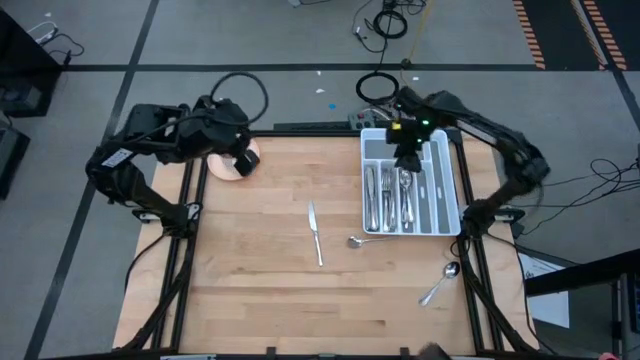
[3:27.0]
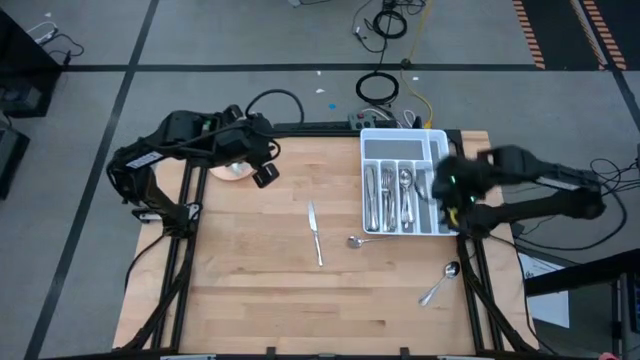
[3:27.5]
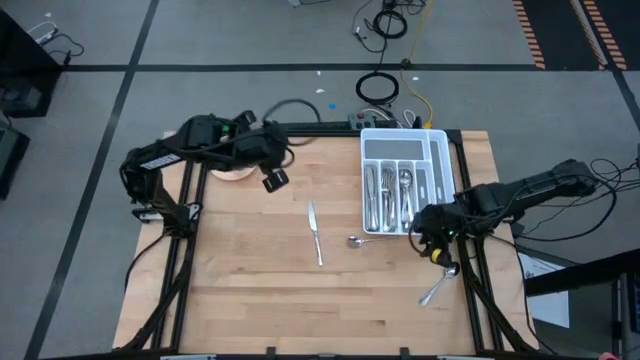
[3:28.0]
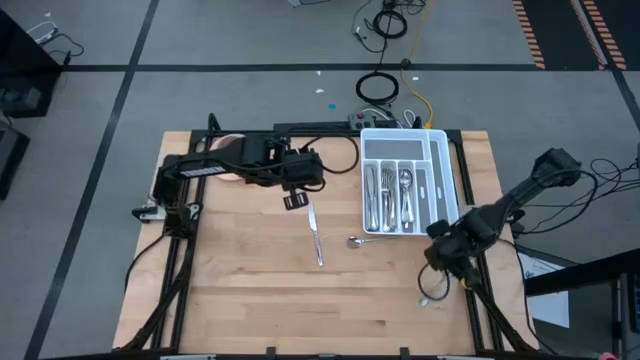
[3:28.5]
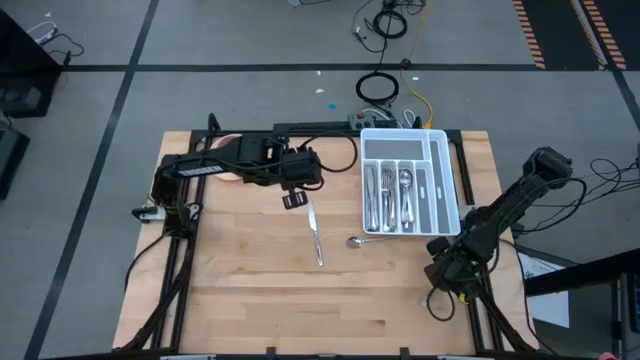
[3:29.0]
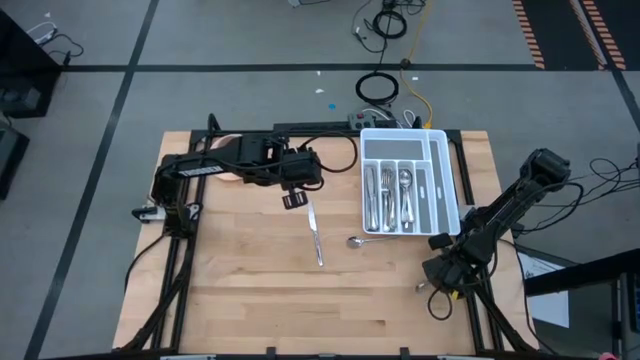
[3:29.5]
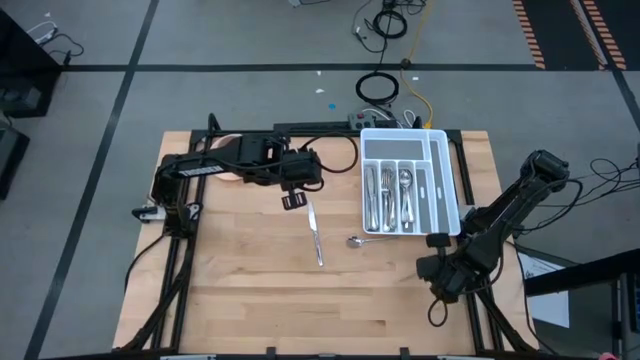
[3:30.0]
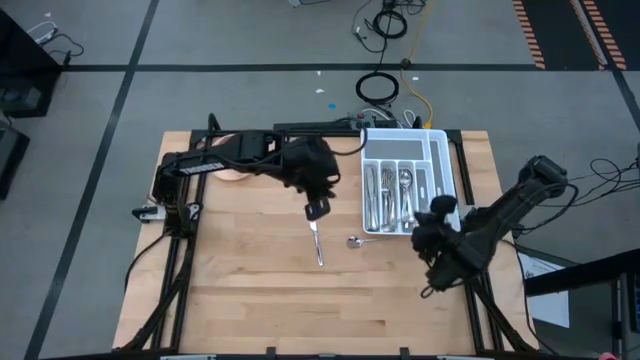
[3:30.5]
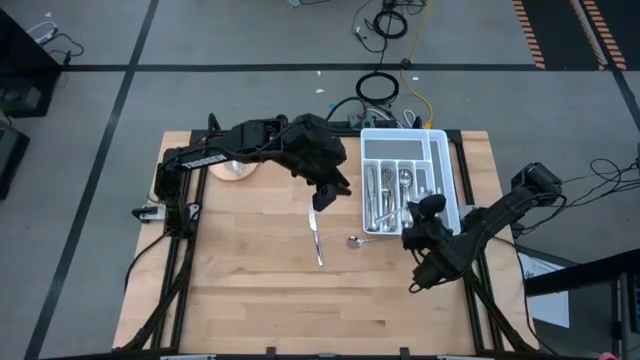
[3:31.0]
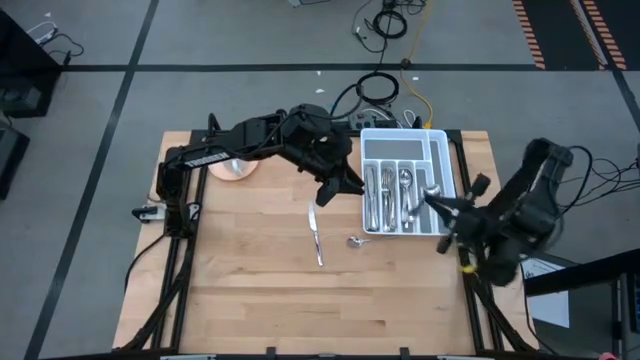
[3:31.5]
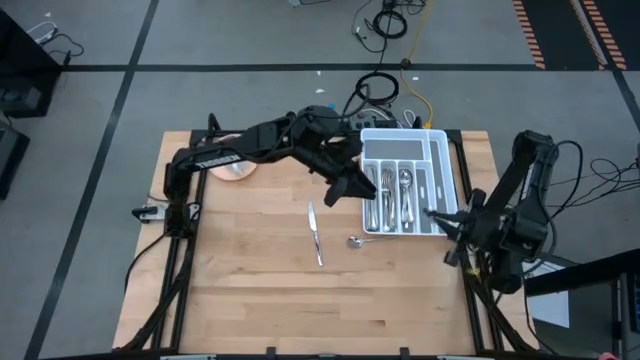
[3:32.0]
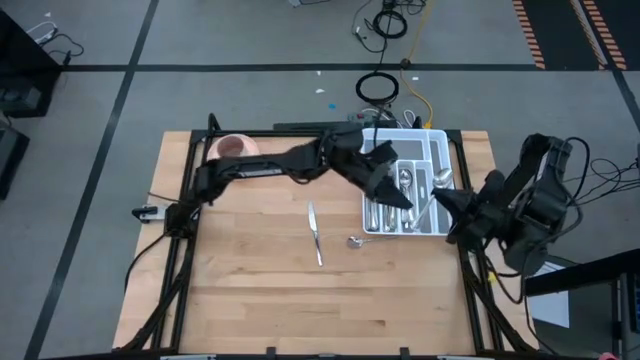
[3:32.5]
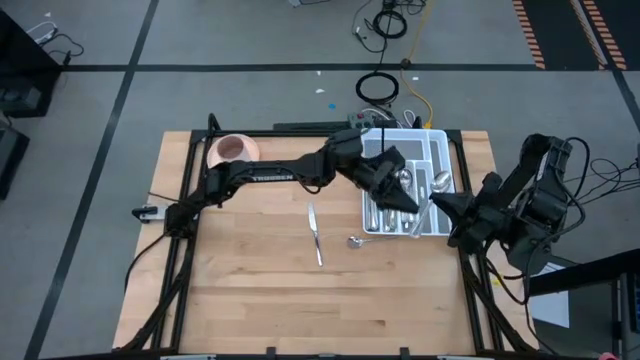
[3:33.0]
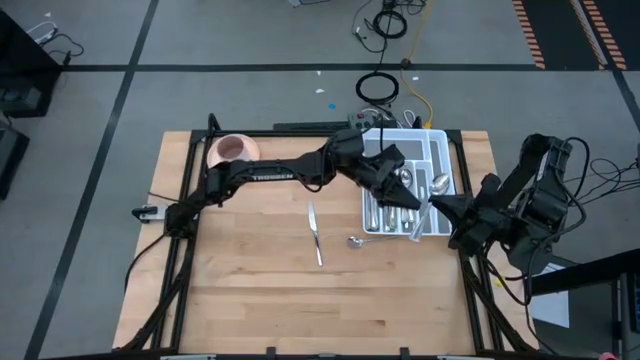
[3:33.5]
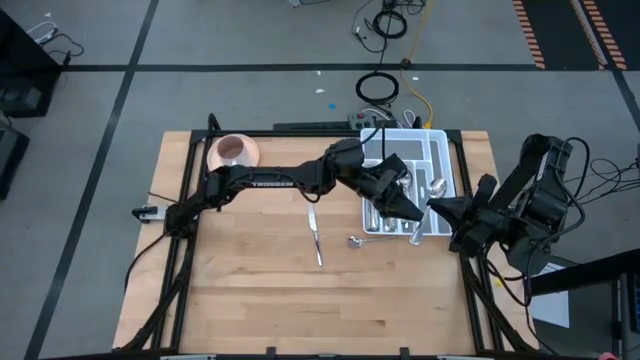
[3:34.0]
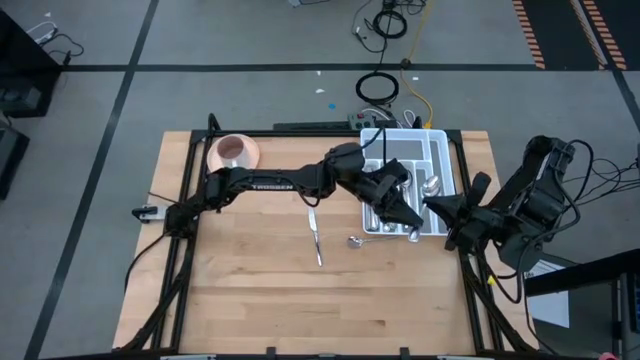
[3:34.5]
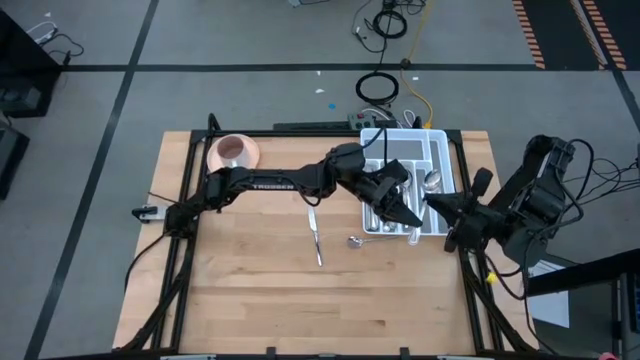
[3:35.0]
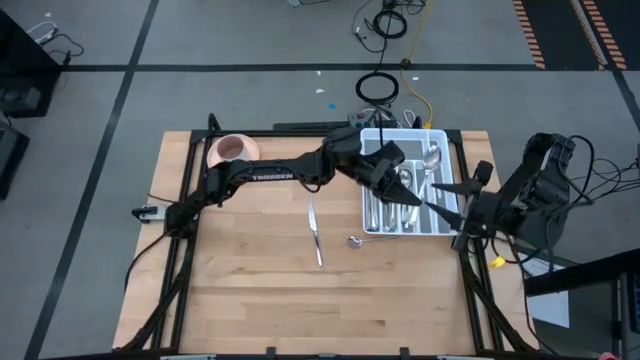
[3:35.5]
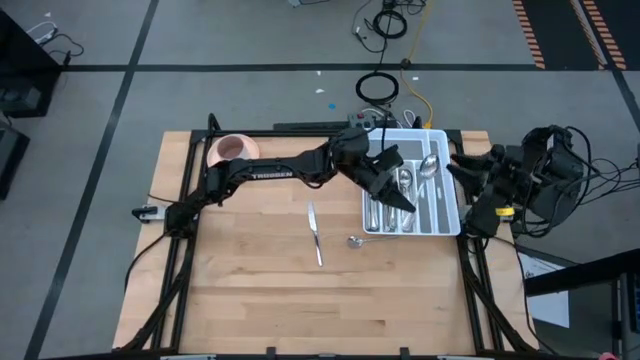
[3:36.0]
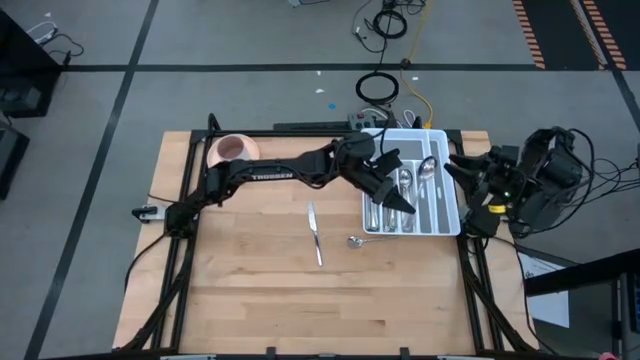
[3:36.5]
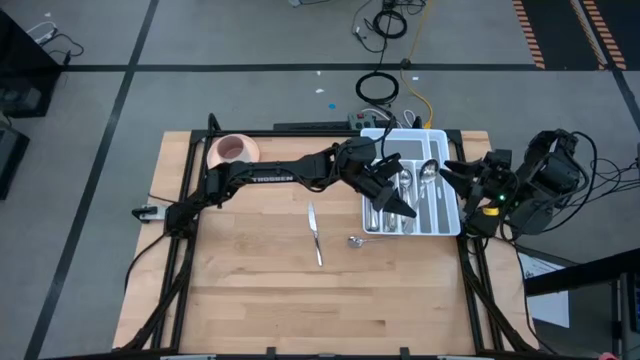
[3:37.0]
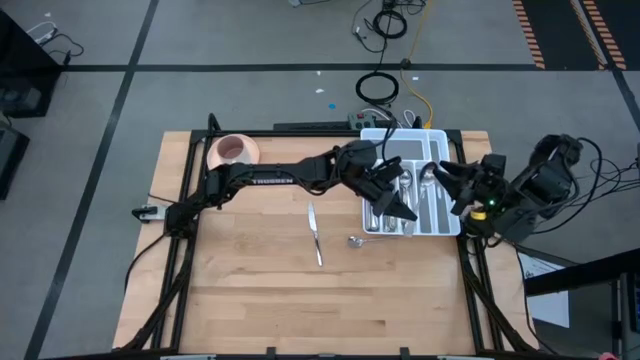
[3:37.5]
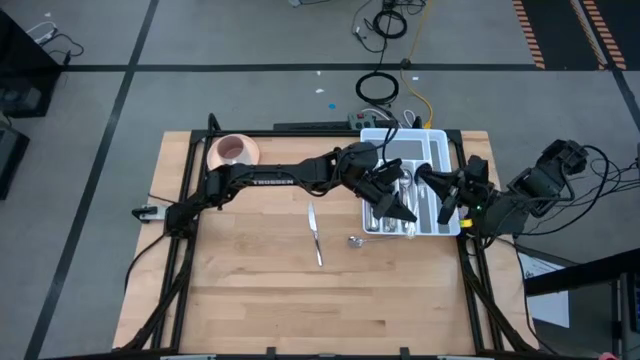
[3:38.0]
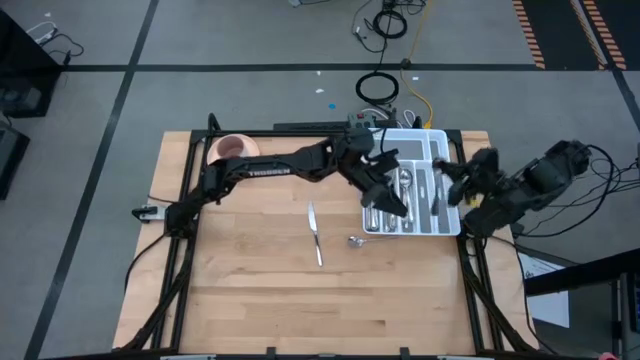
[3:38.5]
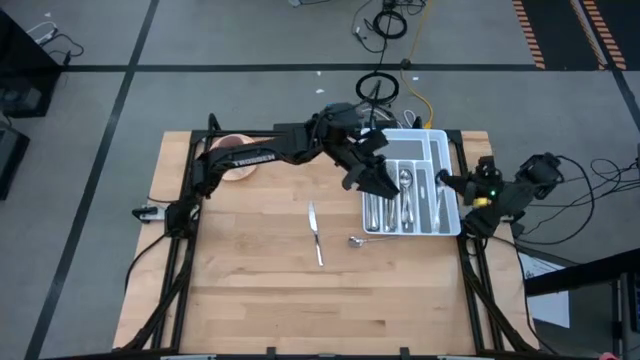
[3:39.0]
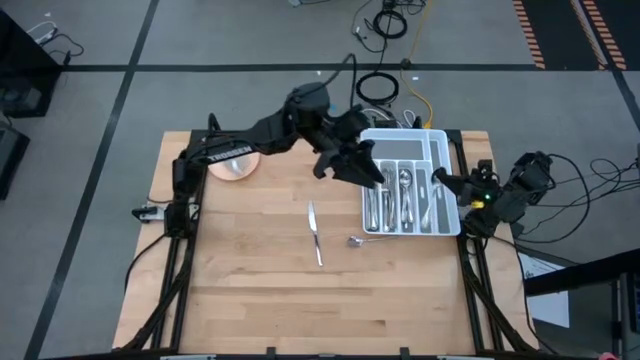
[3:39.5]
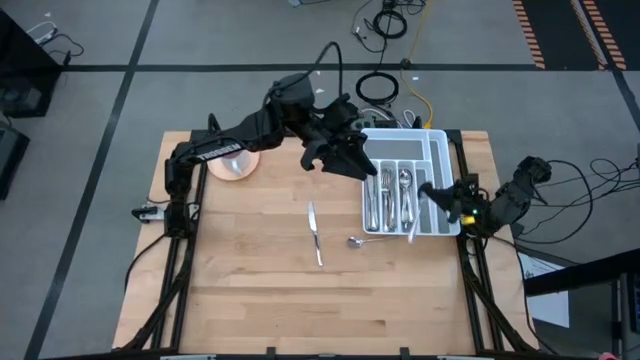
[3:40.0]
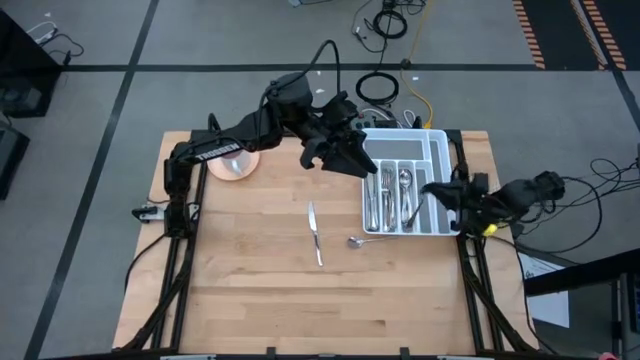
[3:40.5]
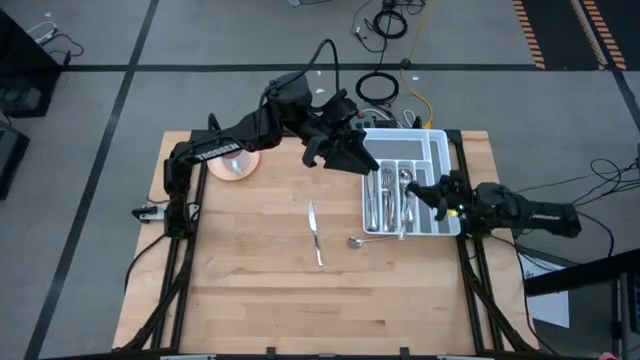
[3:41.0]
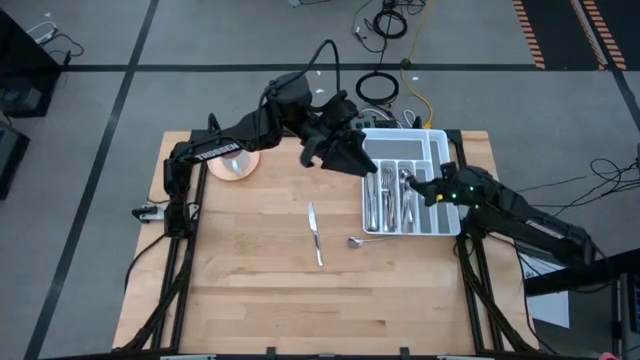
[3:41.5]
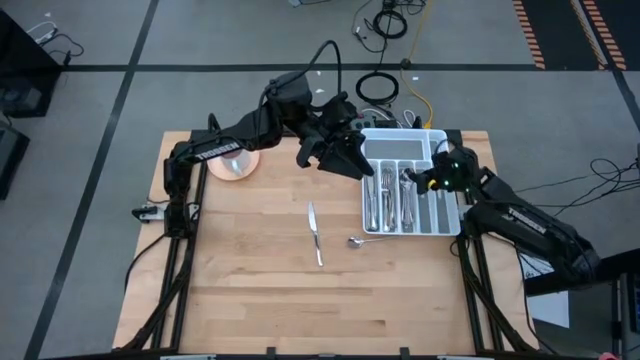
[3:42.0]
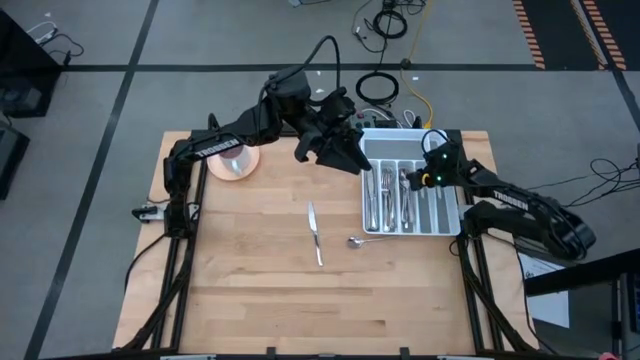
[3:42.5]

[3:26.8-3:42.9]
Task: Sort silverware
Put the silver spoon into the white cutlery tray

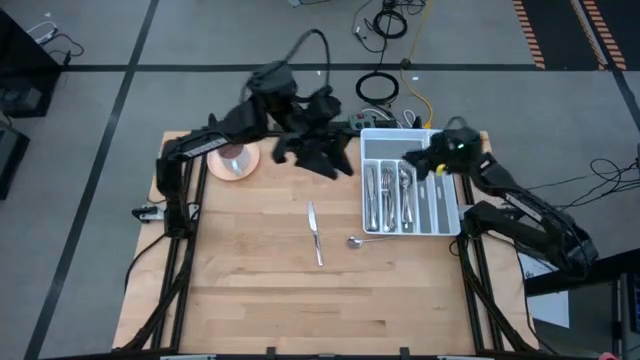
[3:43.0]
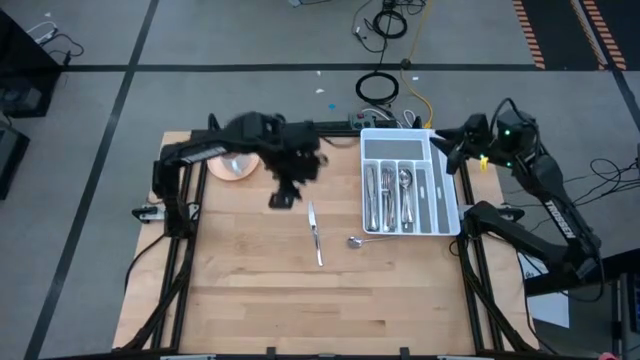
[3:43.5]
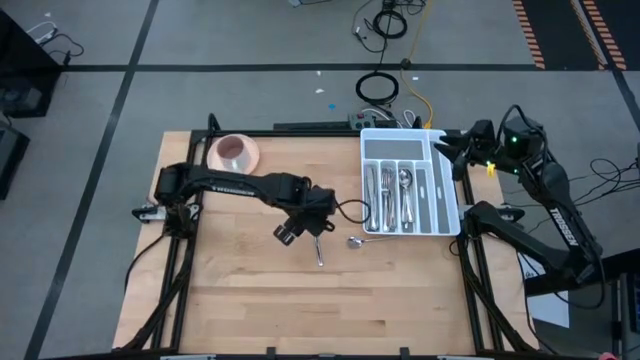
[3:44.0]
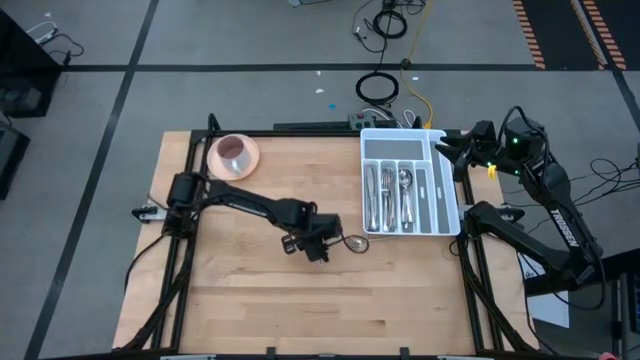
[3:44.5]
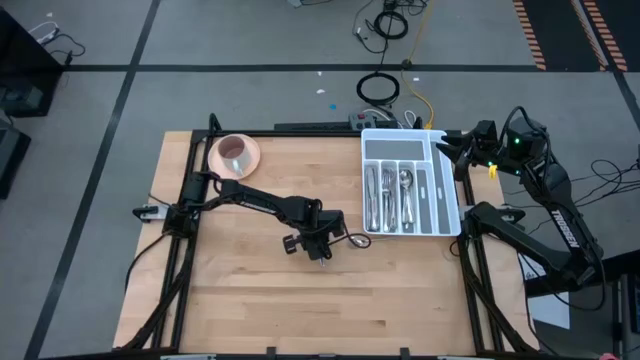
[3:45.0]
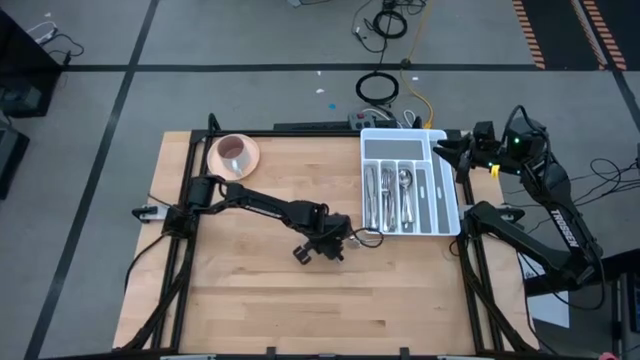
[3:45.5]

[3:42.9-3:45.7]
Put the silver knife into the white cutlery tray

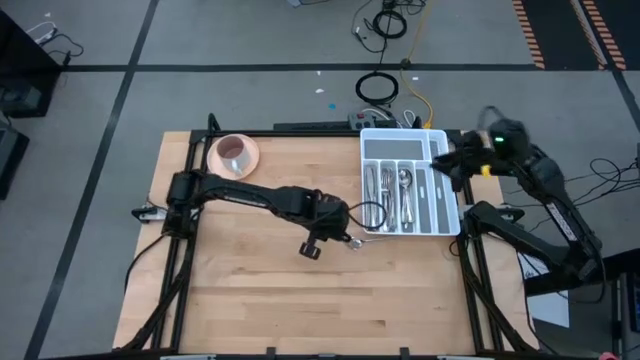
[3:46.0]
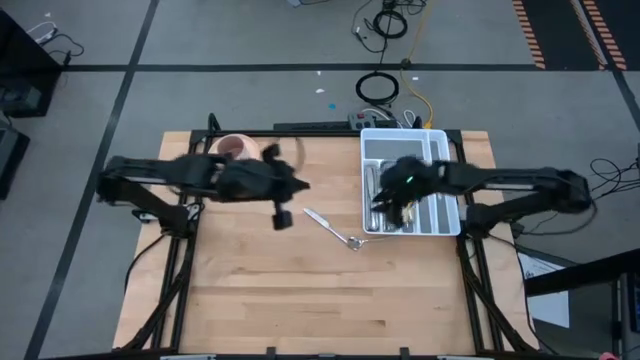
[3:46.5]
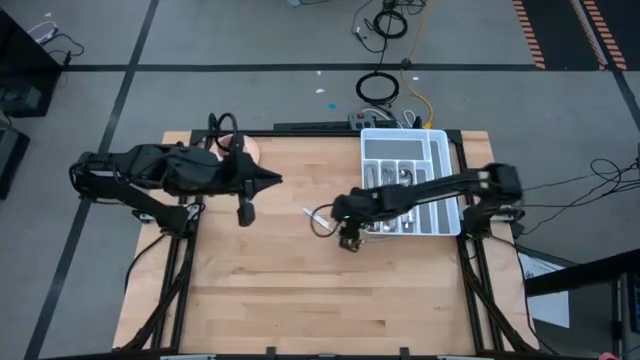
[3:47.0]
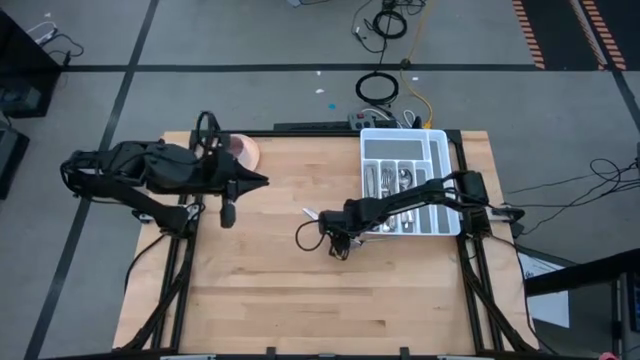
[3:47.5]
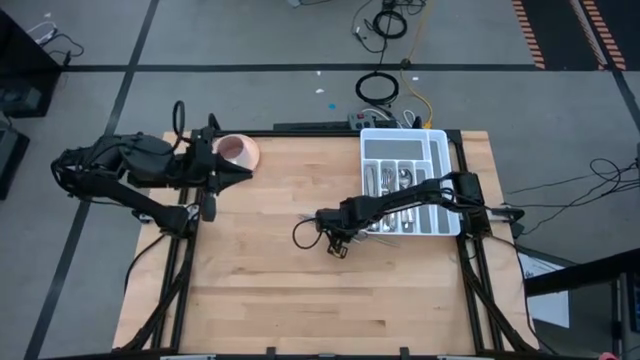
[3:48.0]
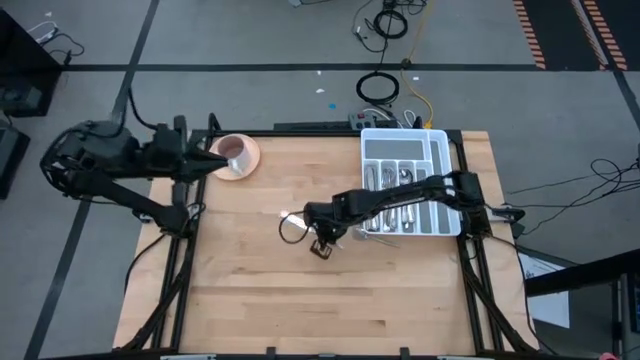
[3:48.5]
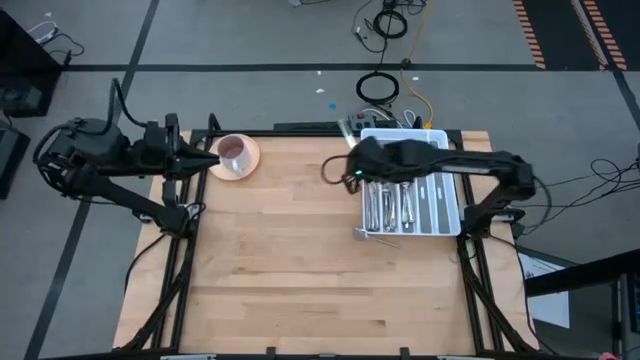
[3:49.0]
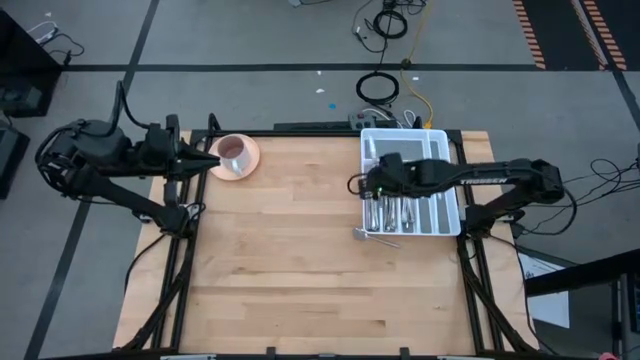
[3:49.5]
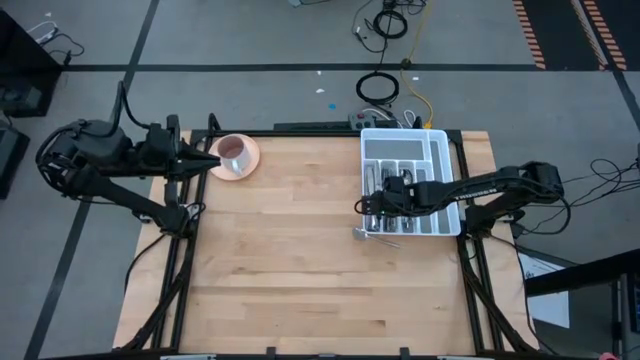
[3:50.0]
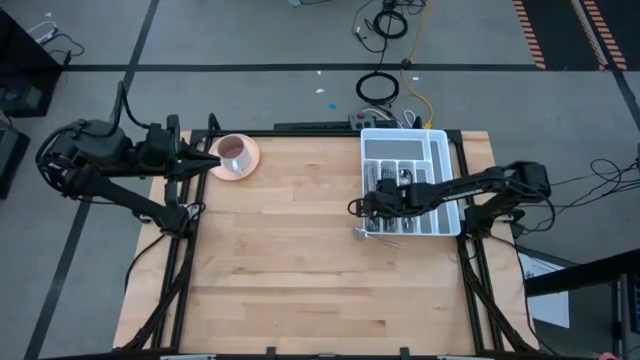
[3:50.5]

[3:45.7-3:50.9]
Put the silver knife into the white cutlery tray
